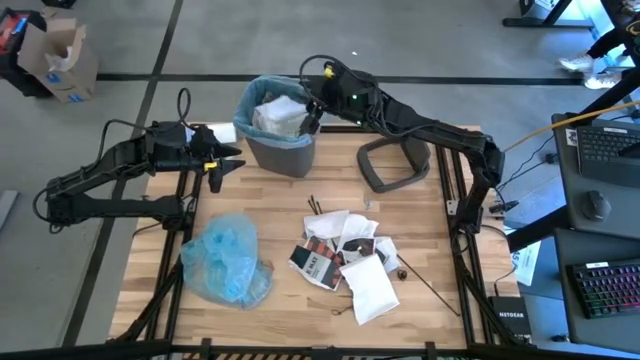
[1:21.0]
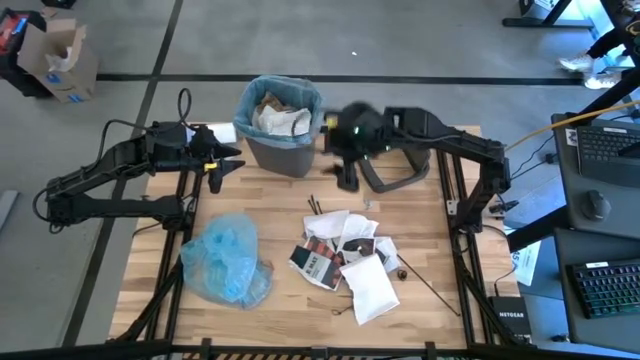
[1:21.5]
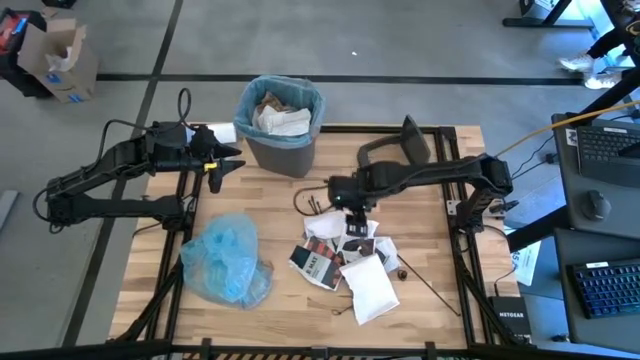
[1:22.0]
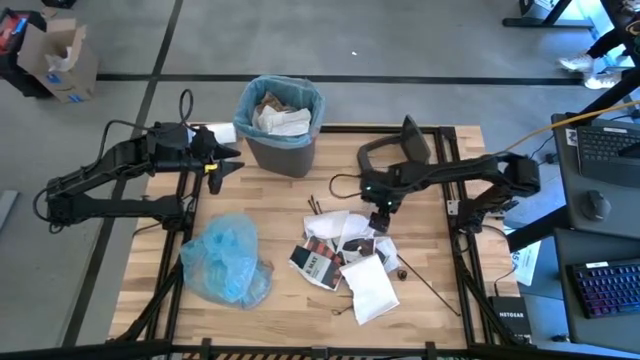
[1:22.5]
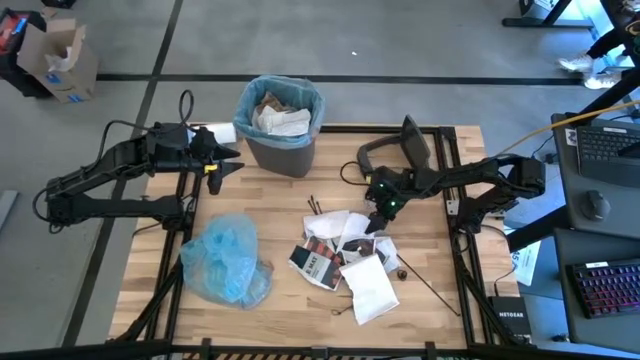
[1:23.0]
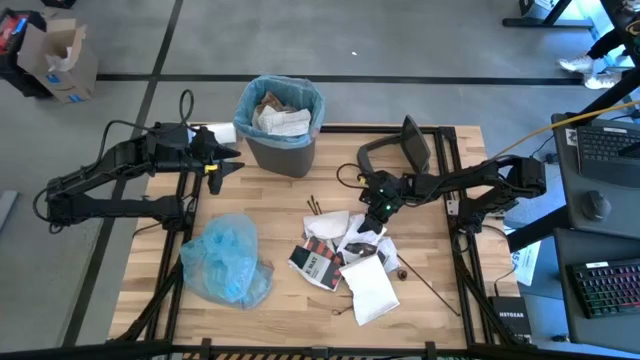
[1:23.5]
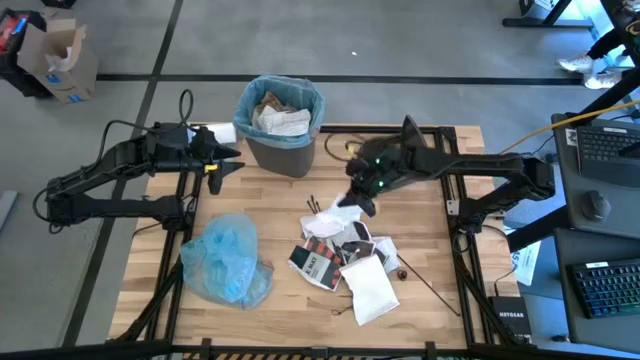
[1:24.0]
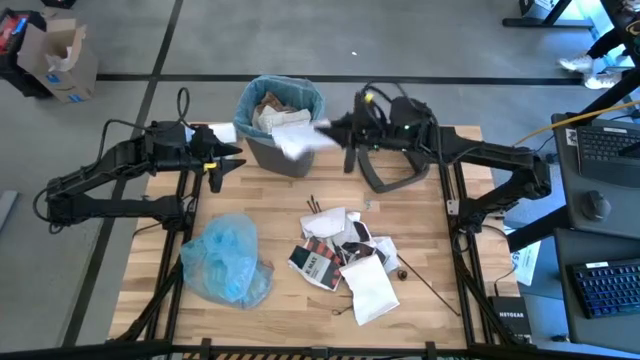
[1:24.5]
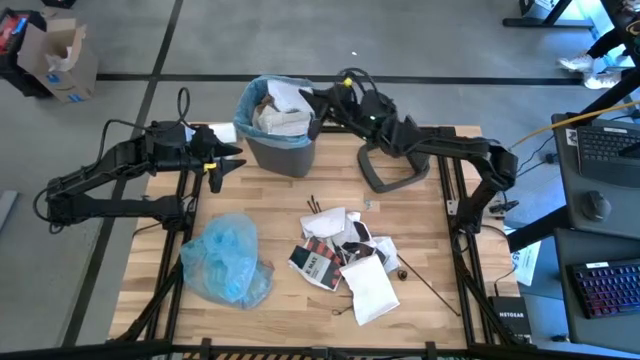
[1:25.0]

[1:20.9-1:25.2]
Task: Pick and place trash into bin
Put the piece of white notebook into the trash bin

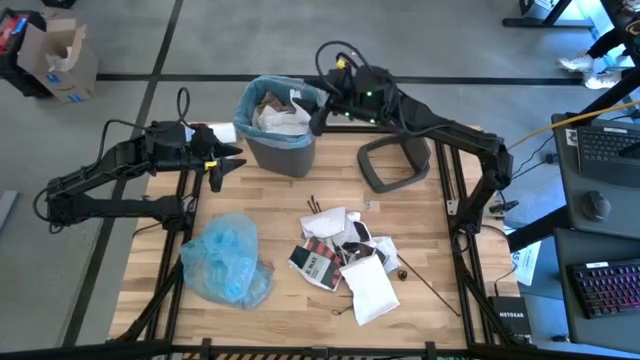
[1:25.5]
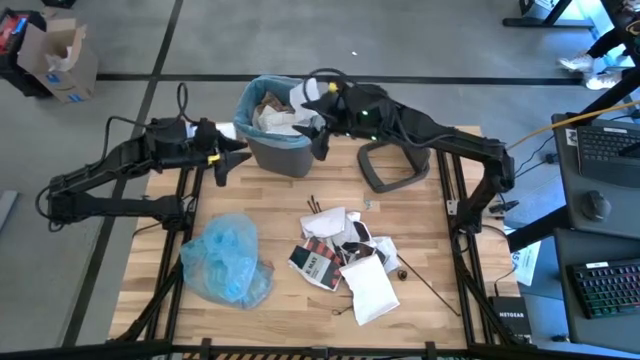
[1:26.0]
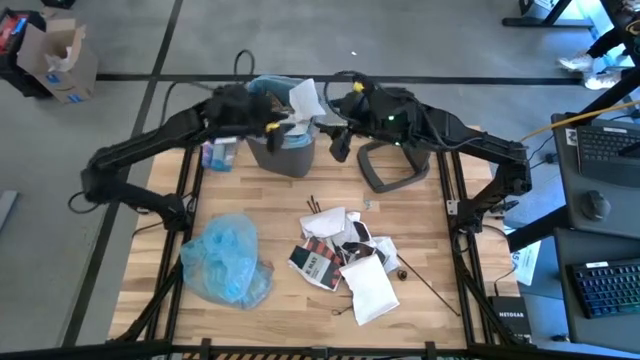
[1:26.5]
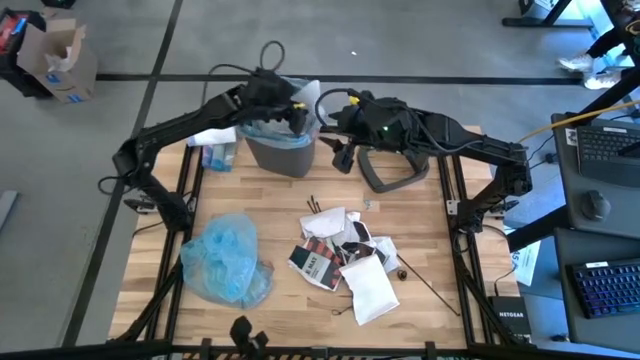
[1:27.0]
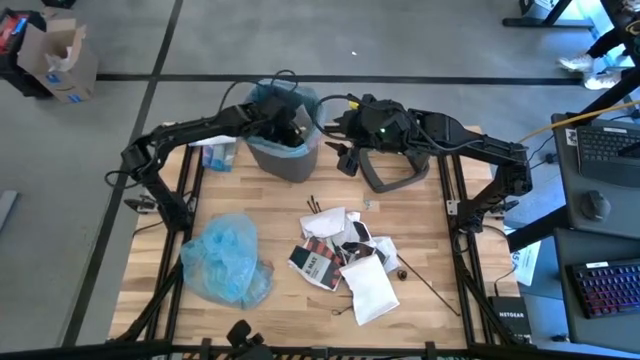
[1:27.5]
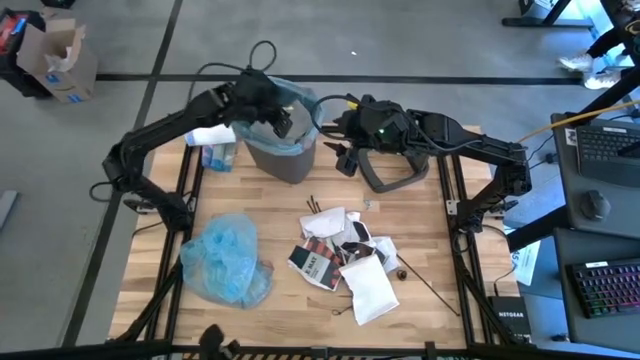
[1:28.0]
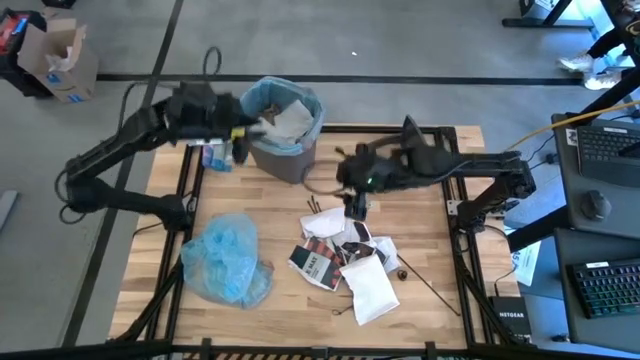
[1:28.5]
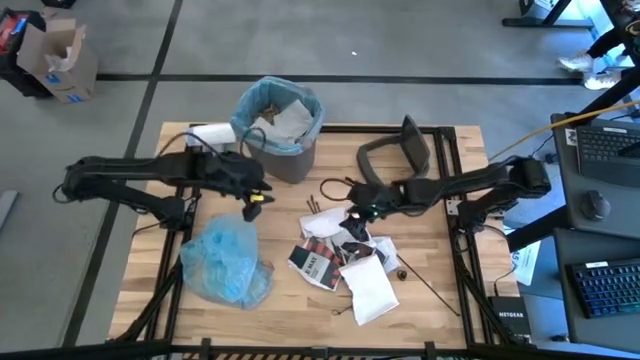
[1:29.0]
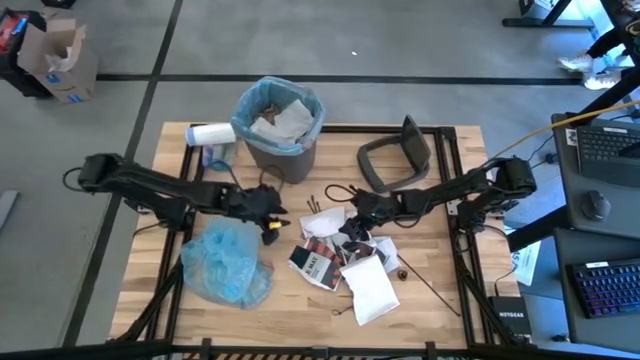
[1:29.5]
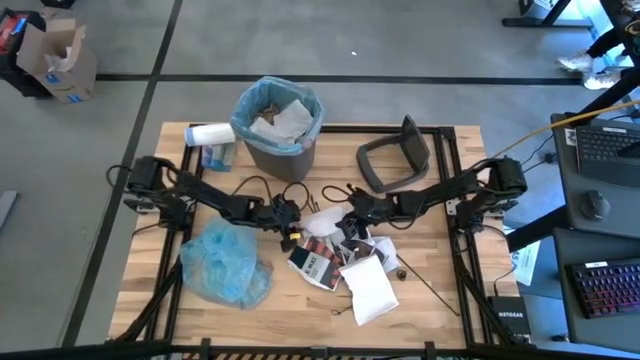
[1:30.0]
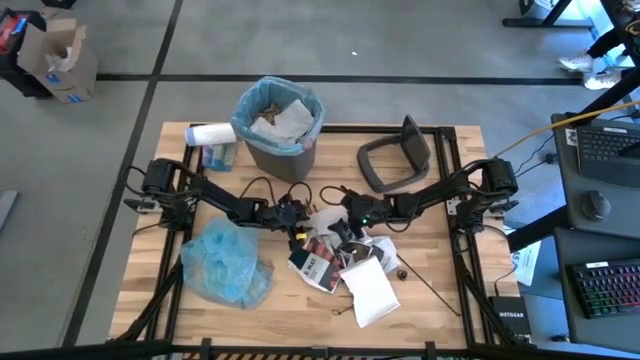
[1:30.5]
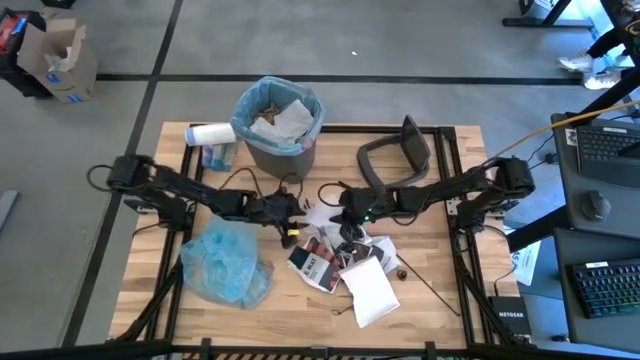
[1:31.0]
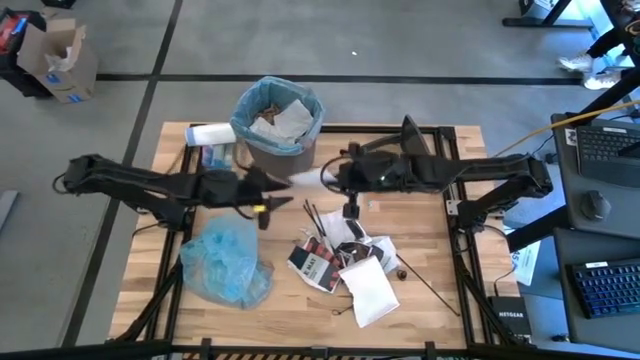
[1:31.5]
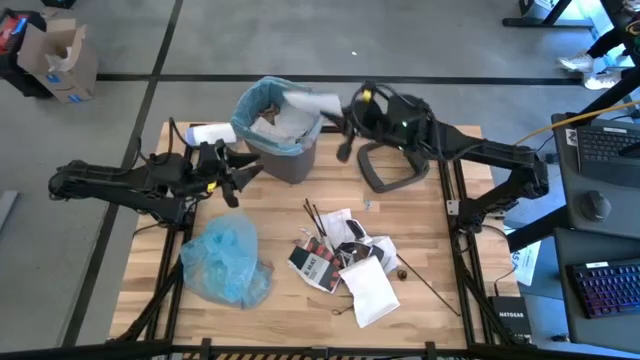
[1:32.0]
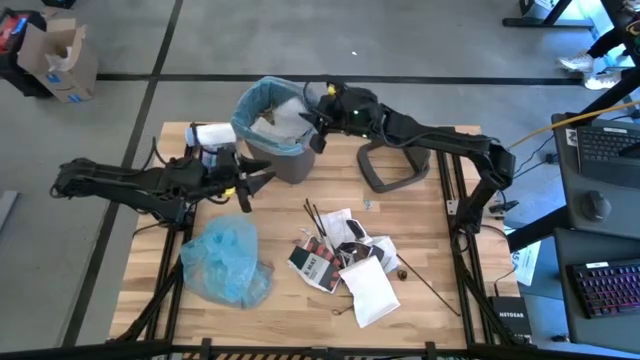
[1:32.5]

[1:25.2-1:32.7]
Put the transparent cellophane and white paper into the trash bin

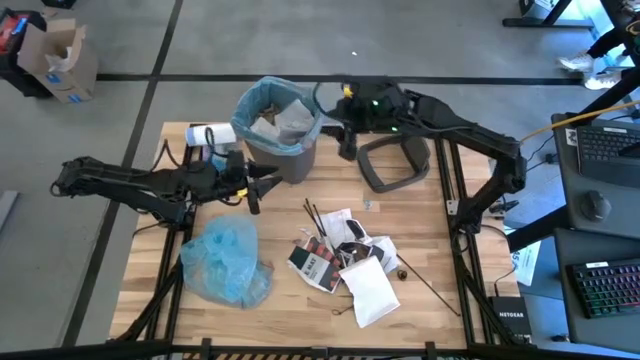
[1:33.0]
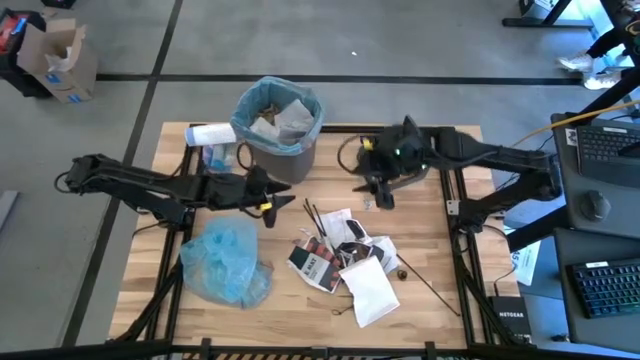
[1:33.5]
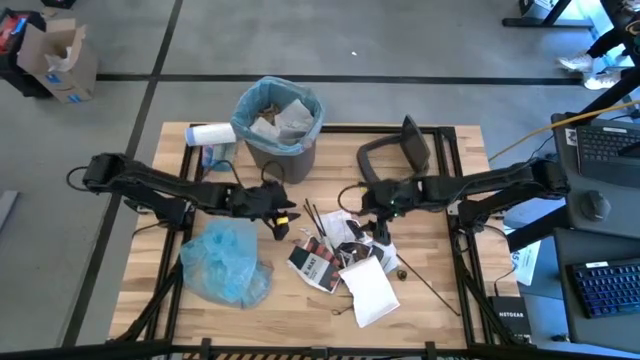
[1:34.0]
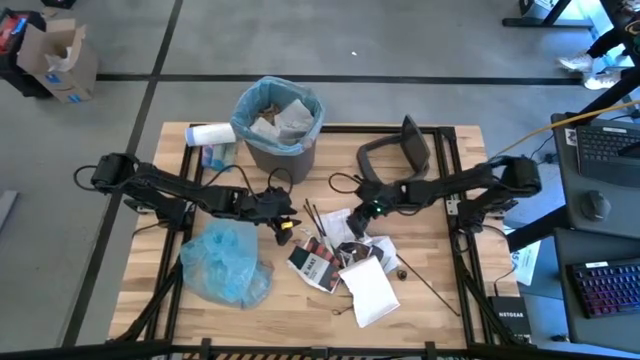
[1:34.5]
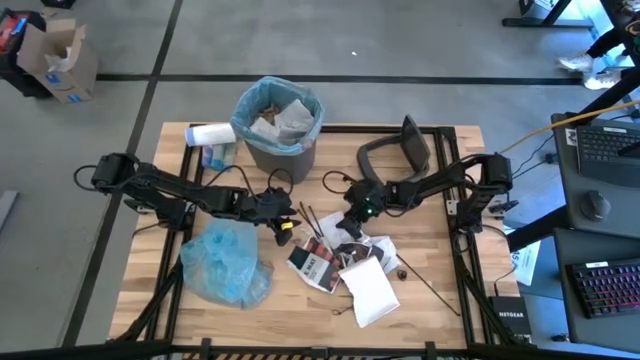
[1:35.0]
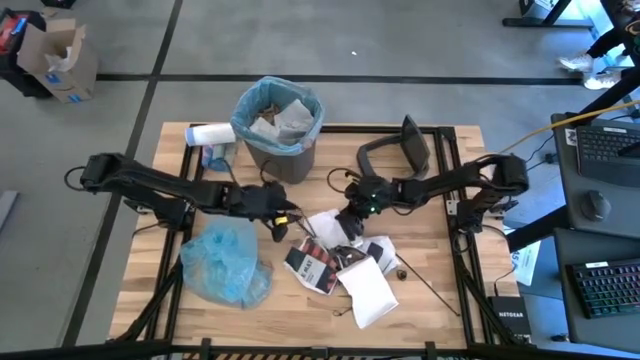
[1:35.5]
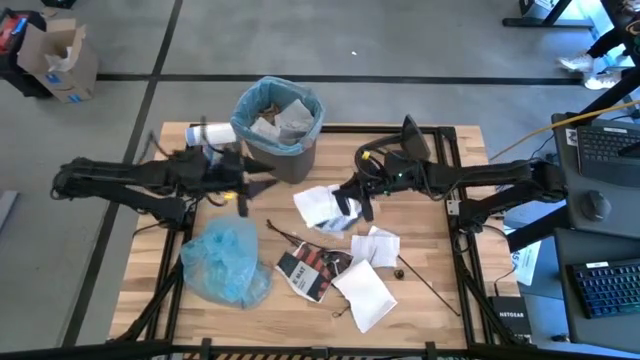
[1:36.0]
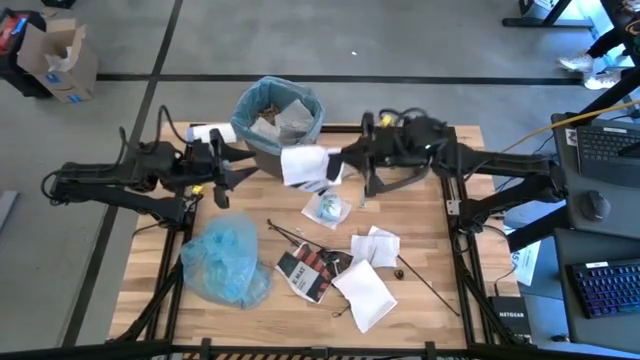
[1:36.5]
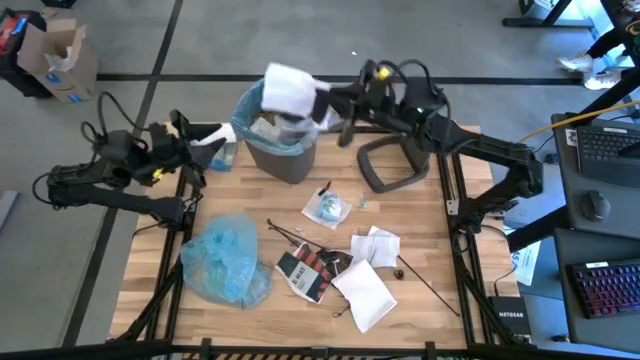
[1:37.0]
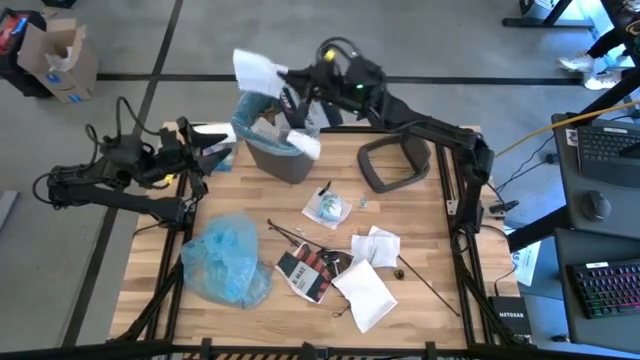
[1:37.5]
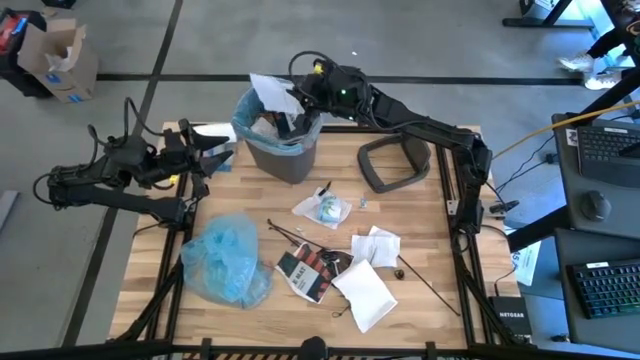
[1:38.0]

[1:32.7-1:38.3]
Put the white notebook and white carton into the trash bin

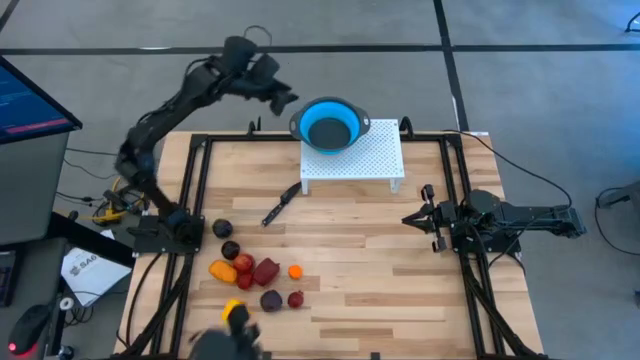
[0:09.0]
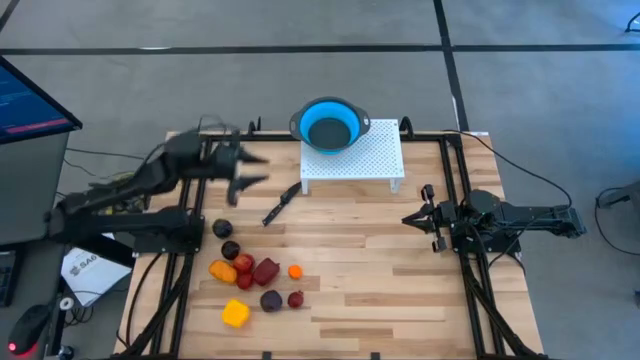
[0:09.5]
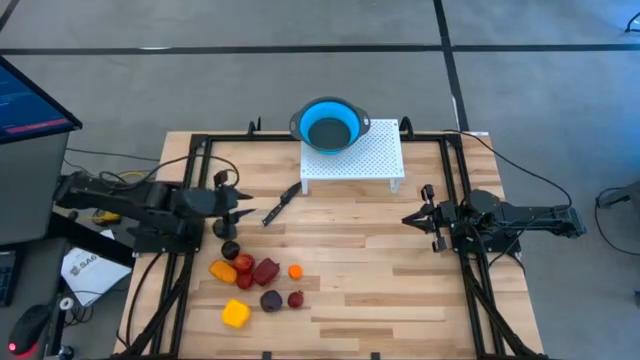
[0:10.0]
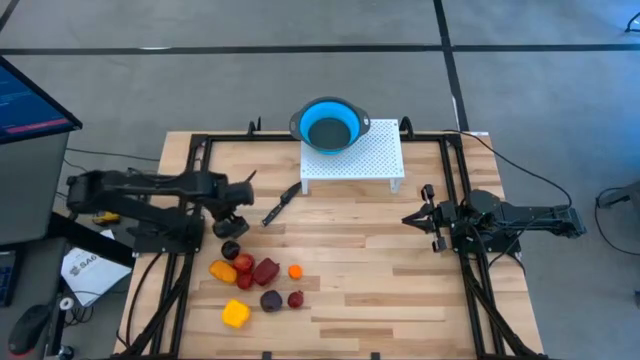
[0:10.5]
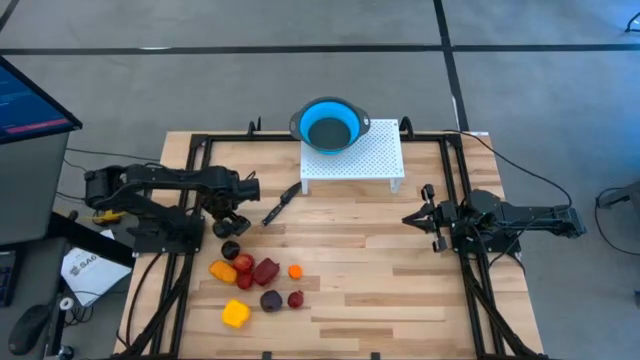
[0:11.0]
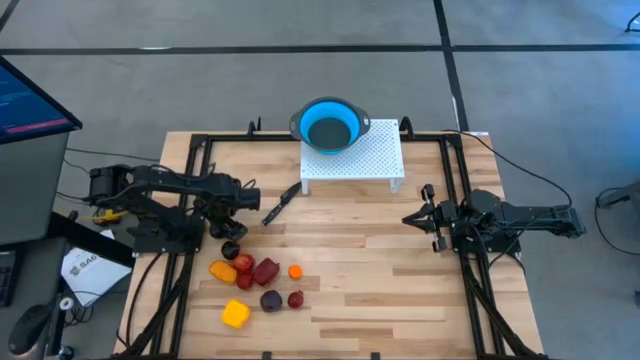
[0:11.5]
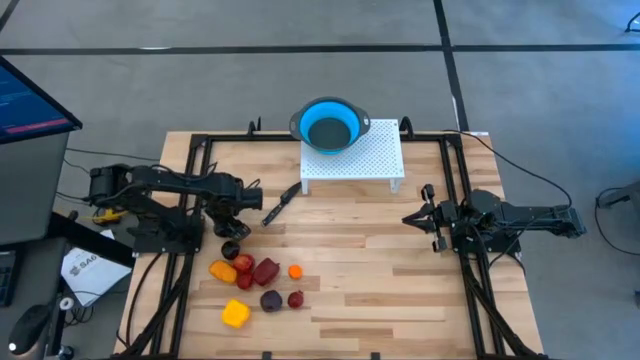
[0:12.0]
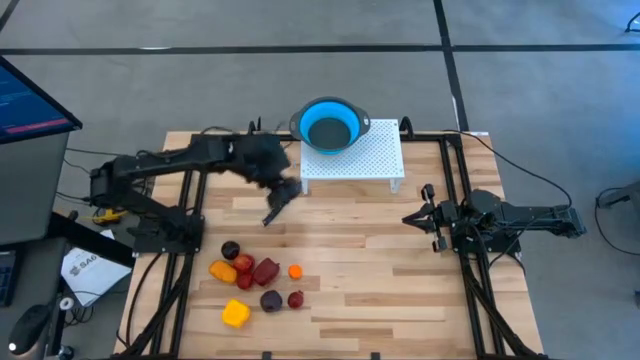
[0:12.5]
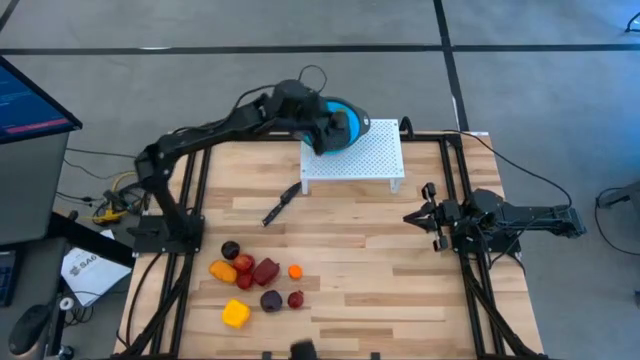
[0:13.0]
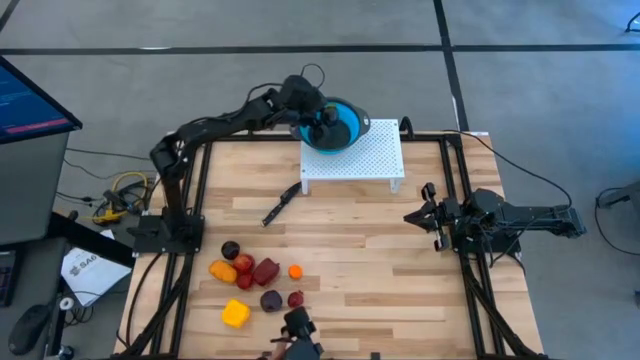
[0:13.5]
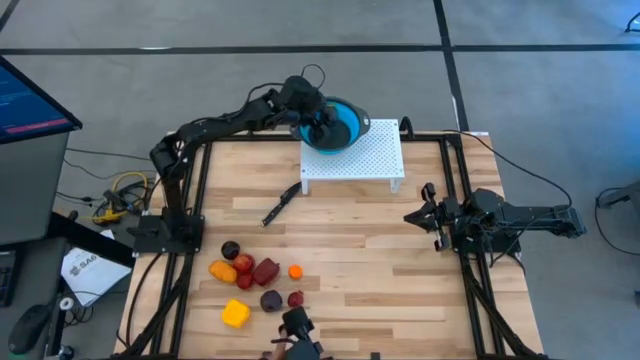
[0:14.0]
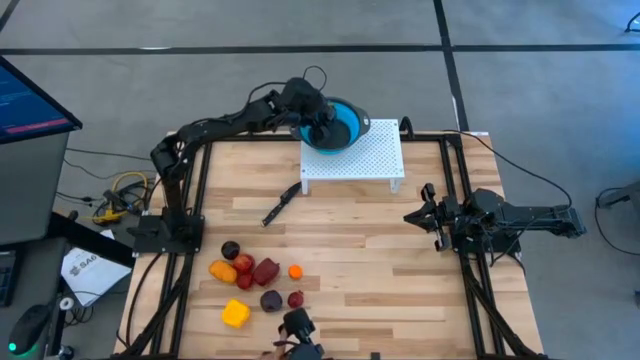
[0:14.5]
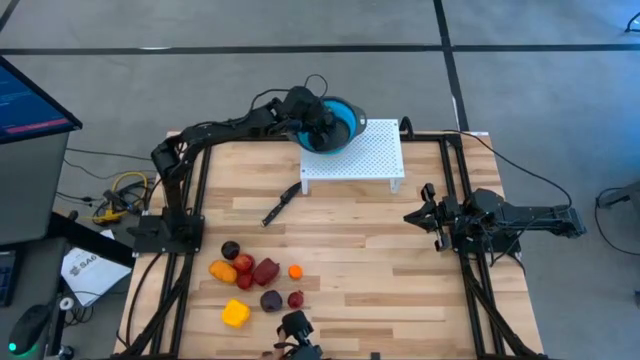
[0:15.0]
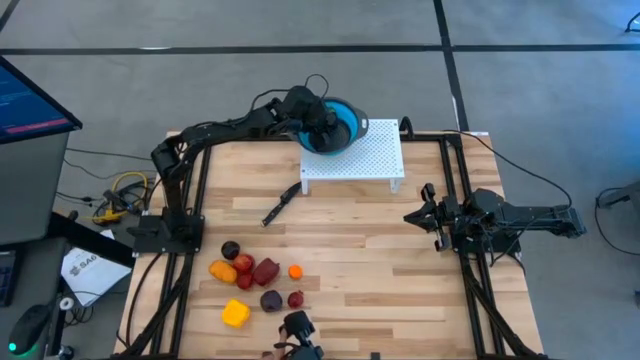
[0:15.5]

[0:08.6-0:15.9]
Task: Pick & Place Fruit
Put the black mangosteen into the blue strainer bowl on the shelf
